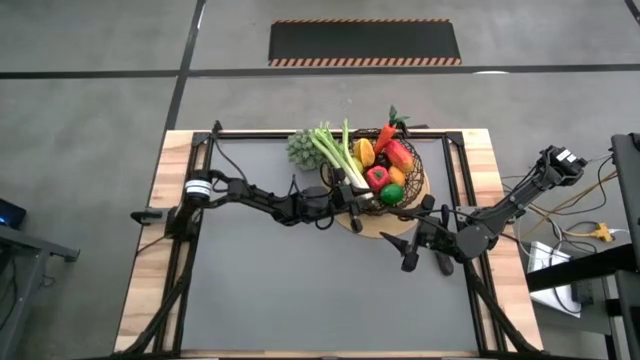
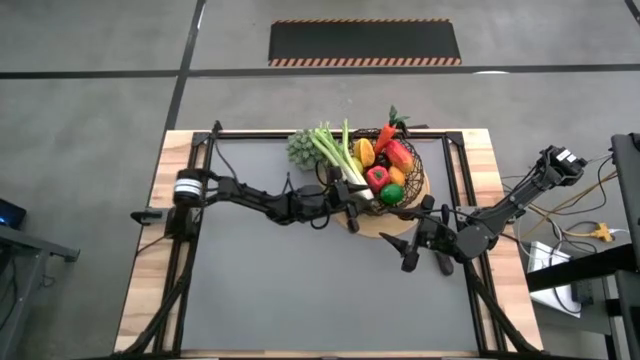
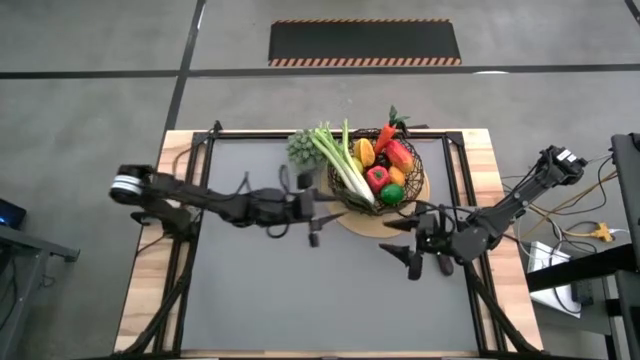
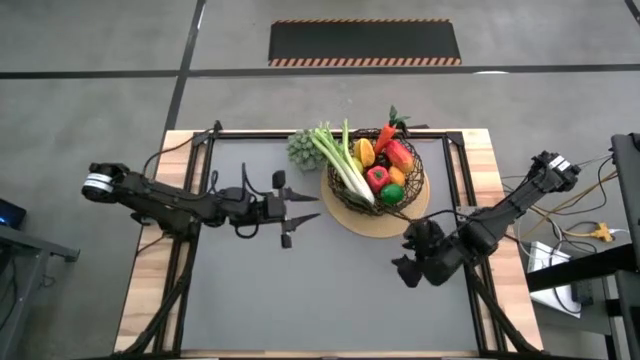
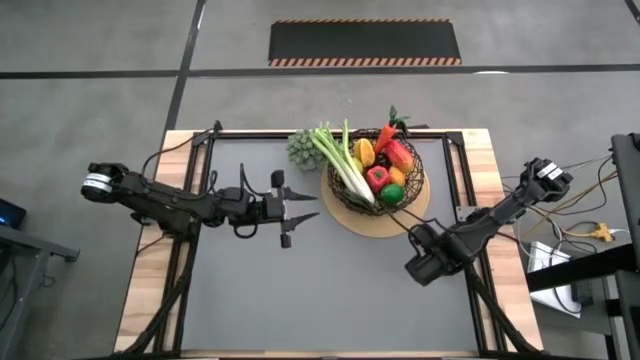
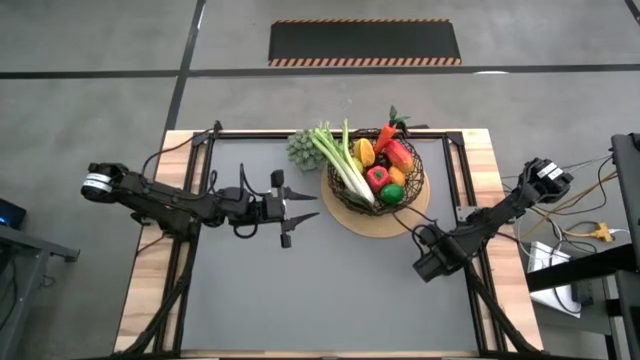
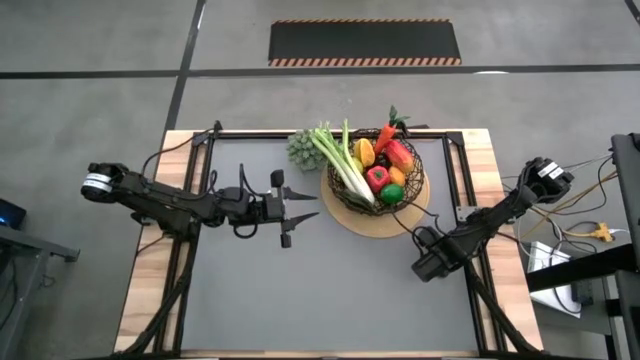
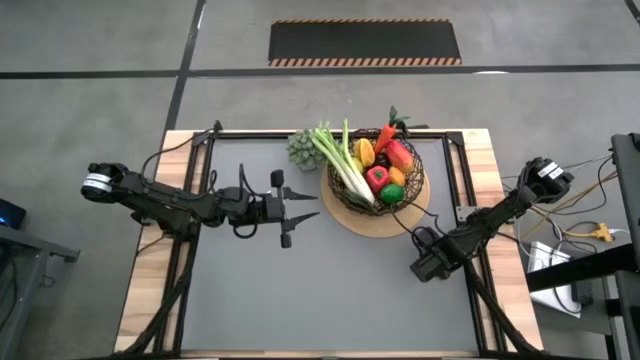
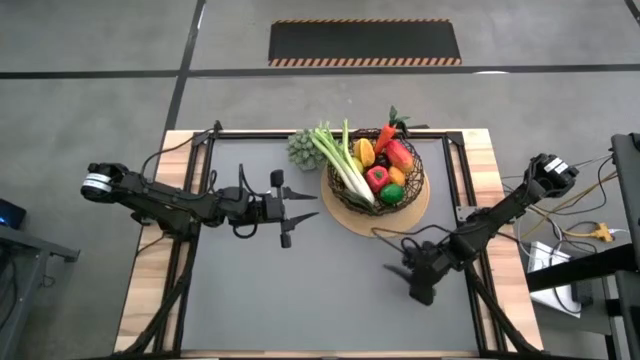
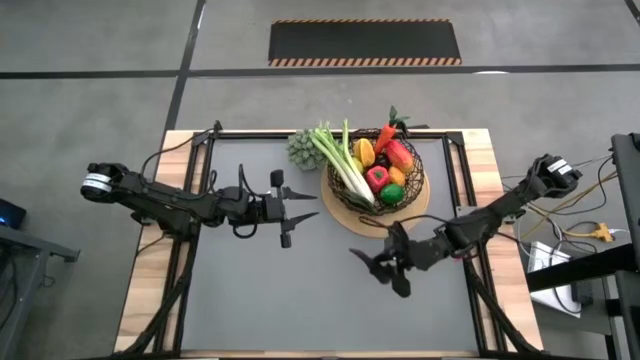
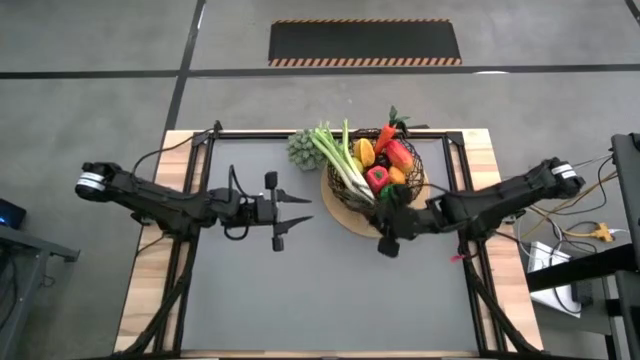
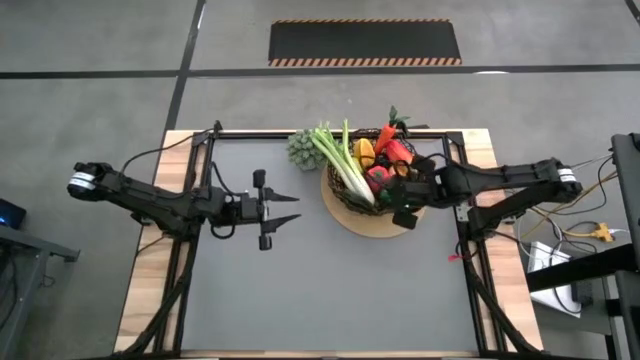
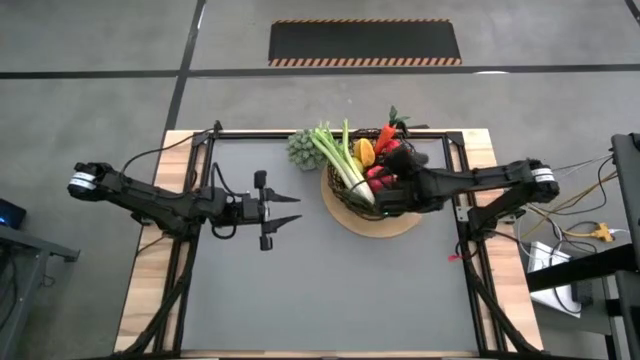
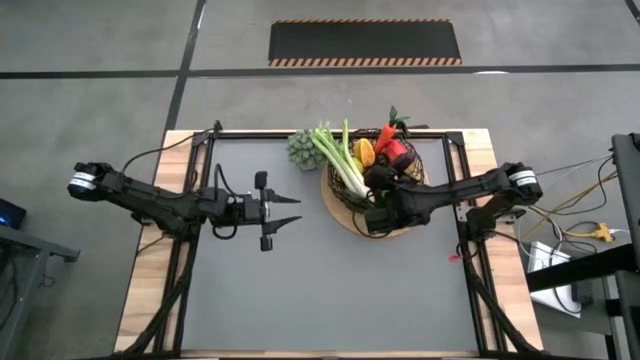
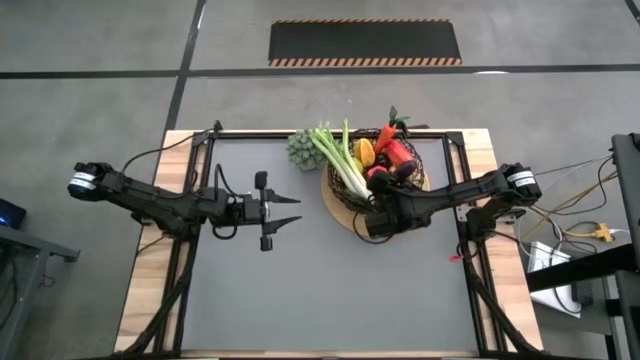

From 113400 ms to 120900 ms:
Task: Build produce basket
Put the purple eggplant into the black wire basket

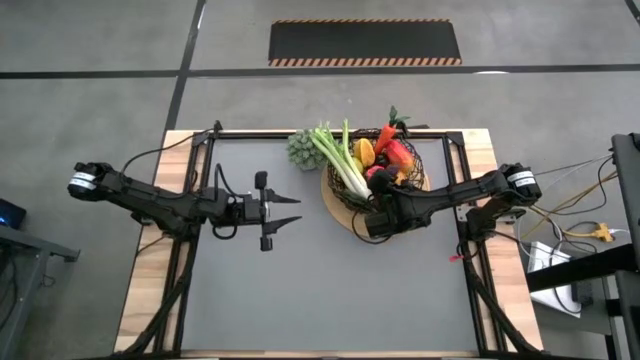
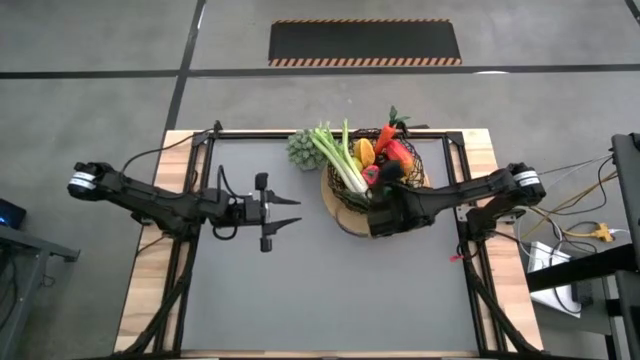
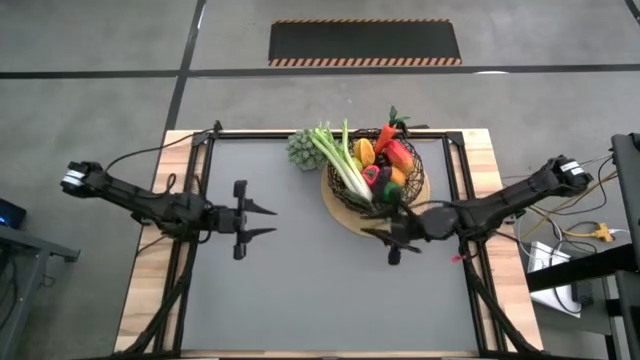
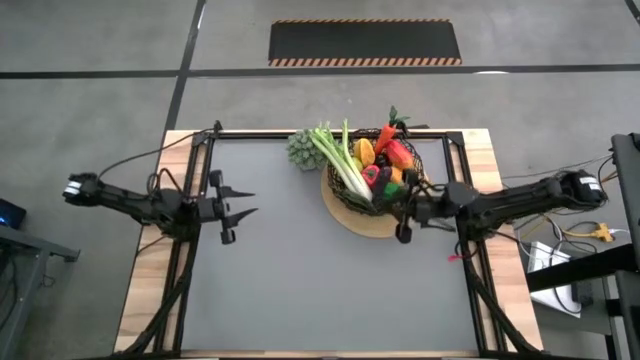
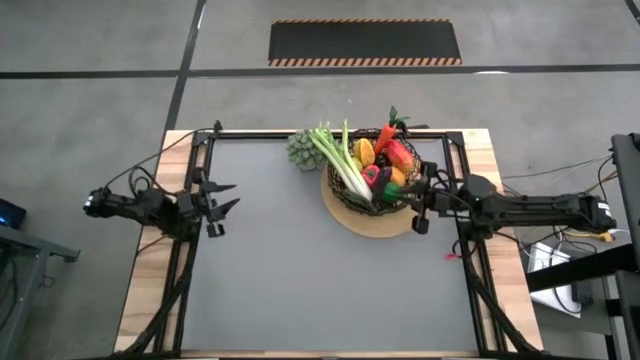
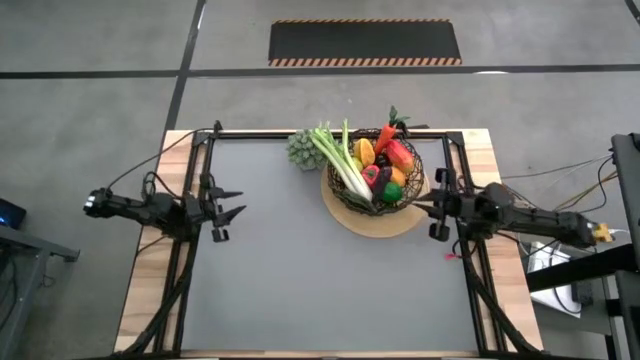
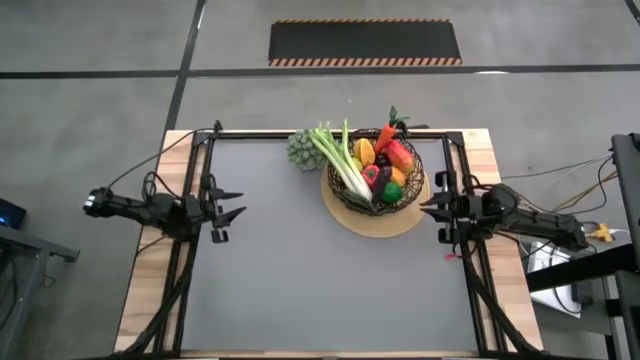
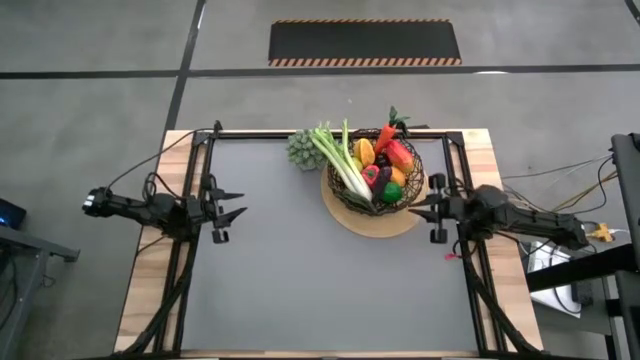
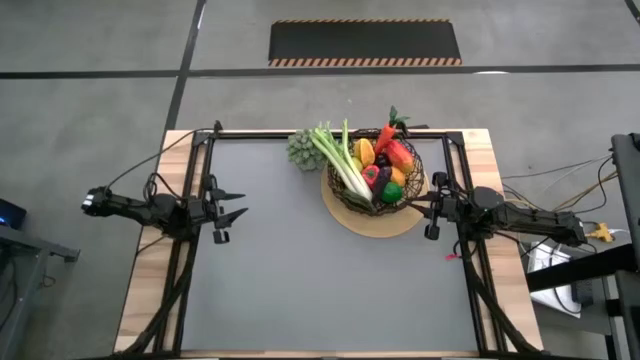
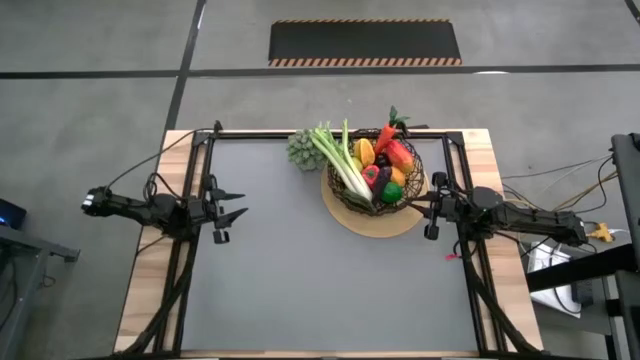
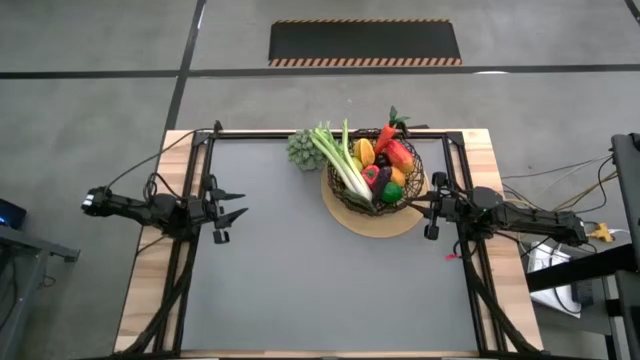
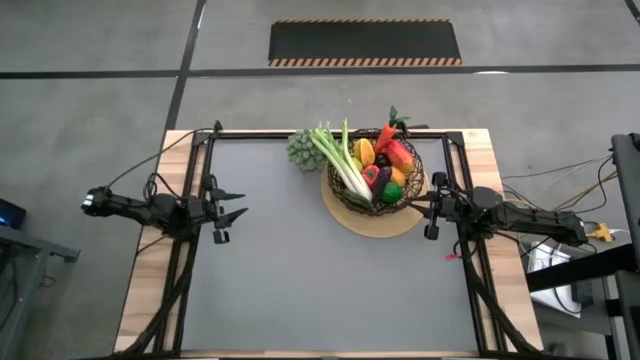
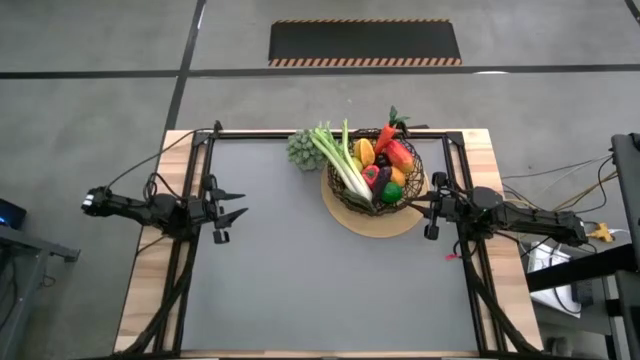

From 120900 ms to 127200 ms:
Return to Home Position

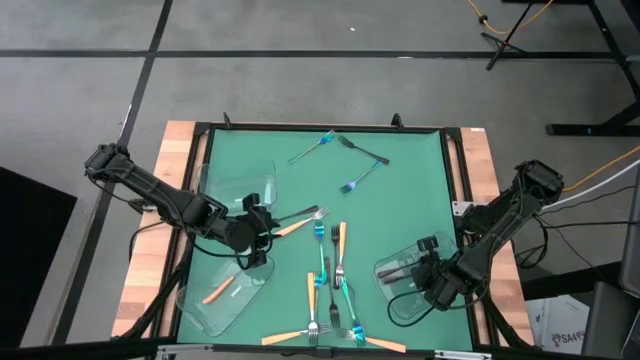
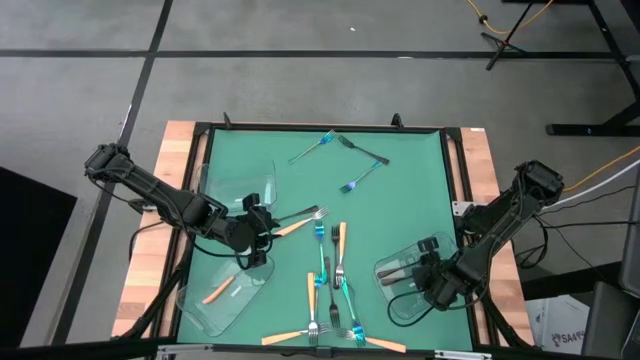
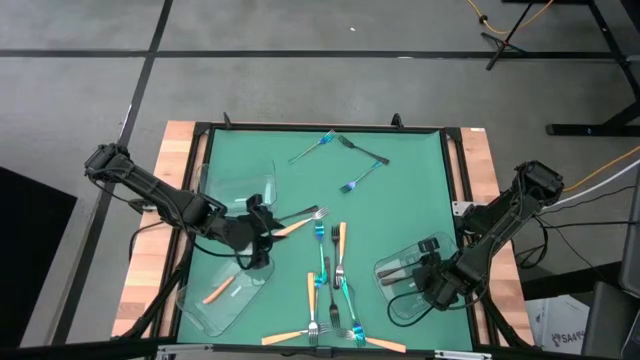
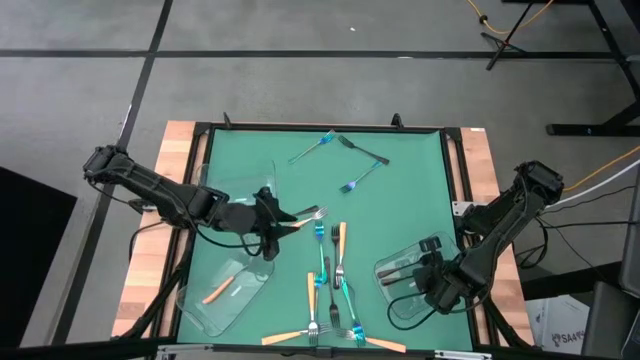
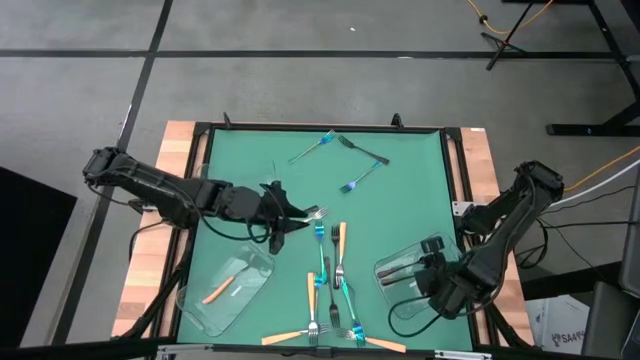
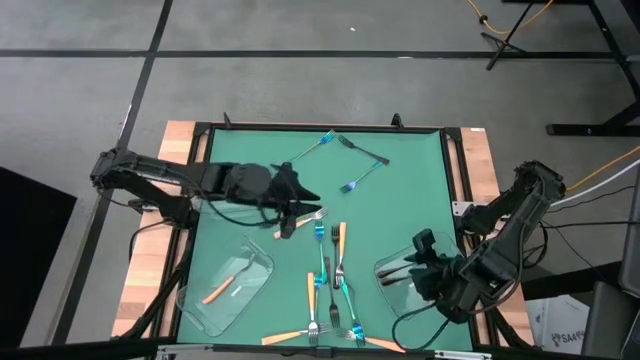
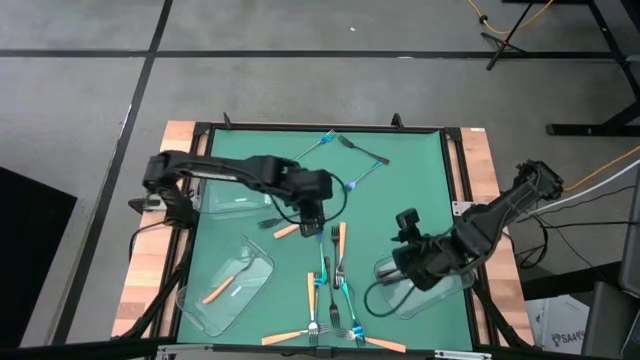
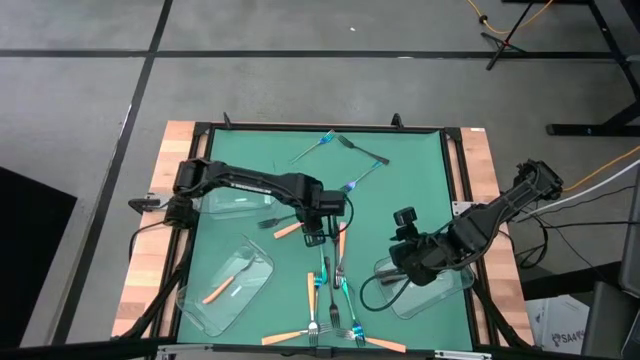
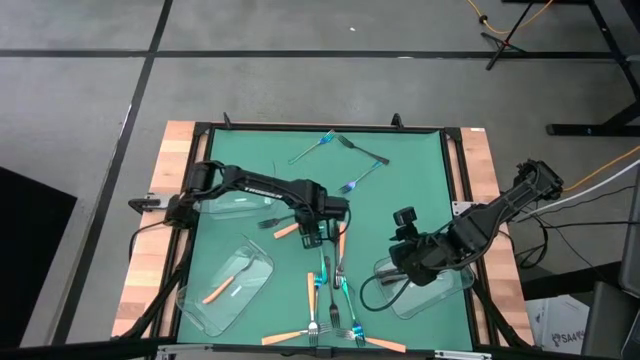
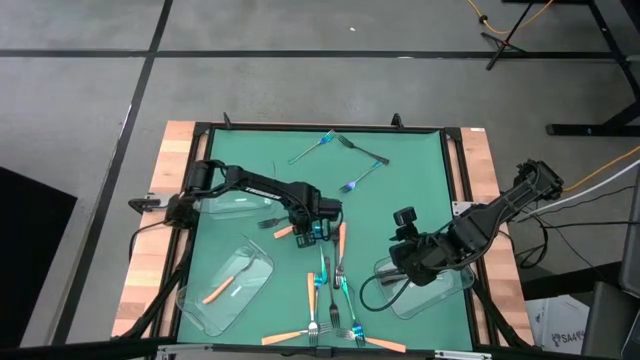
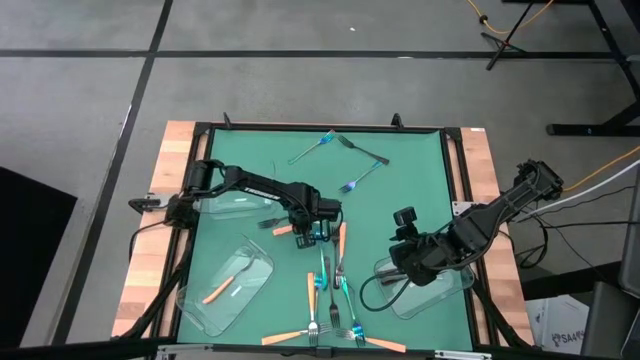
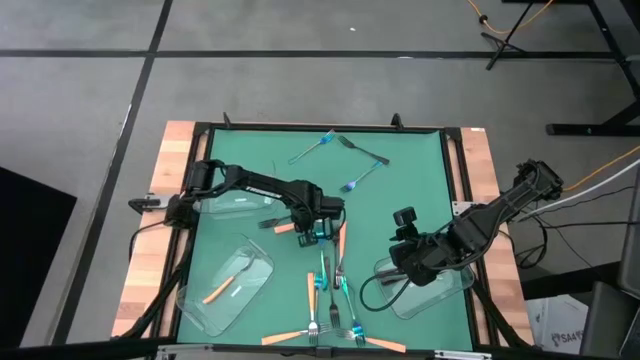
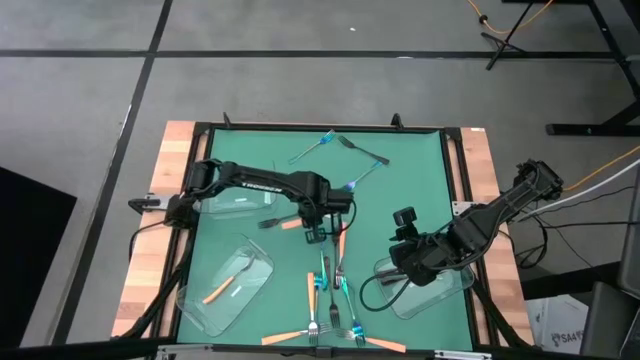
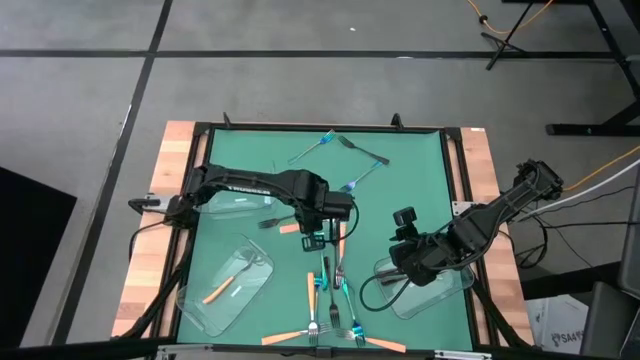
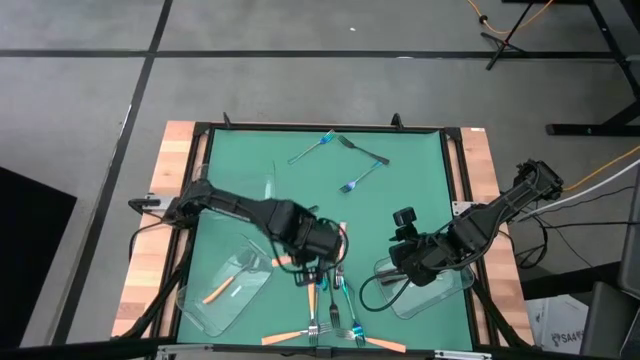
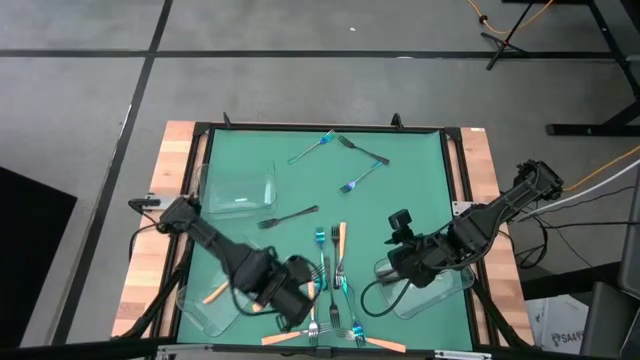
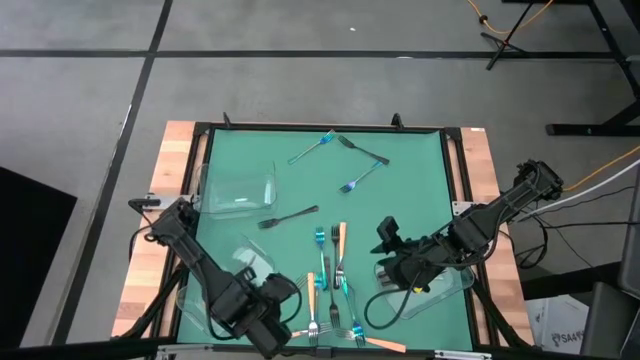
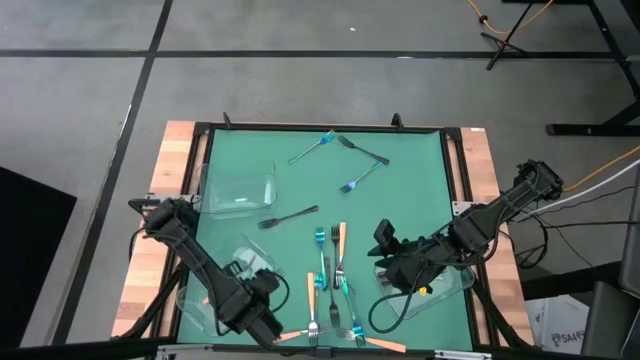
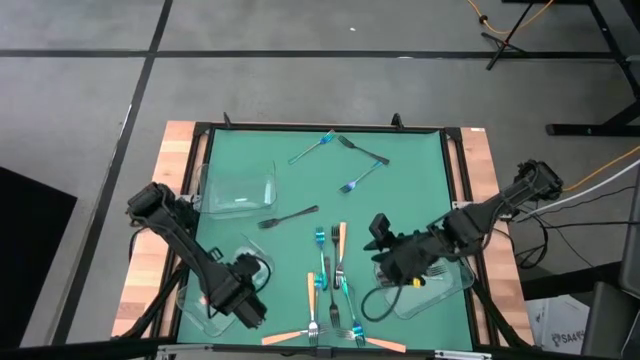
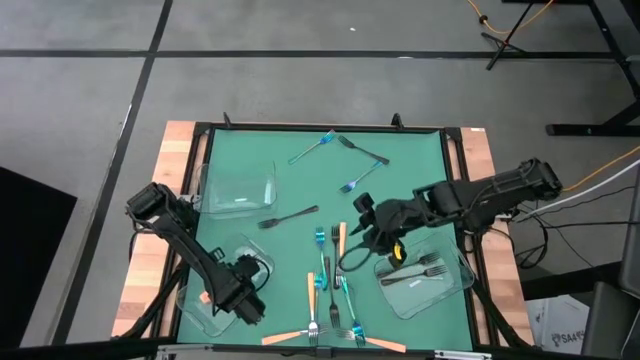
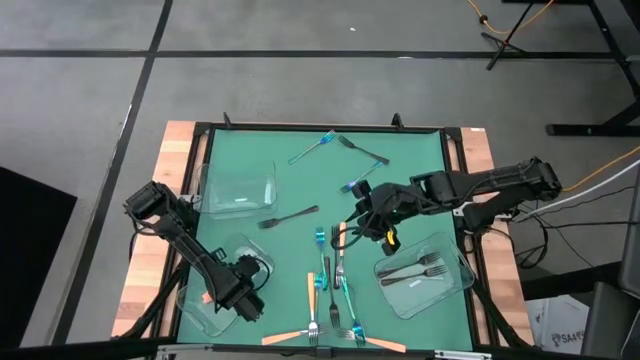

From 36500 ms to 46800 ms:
Task: Sort silverware by color (type)
Put the yellow fork into the bottom left transparent bin
